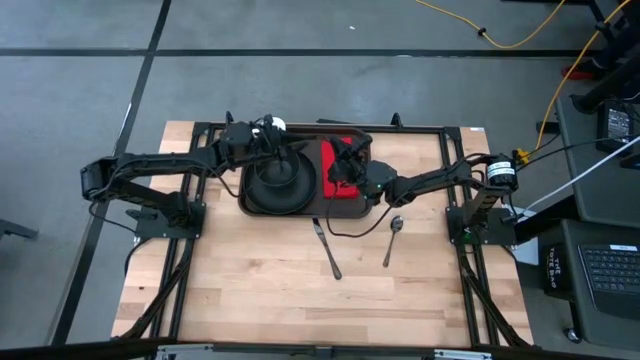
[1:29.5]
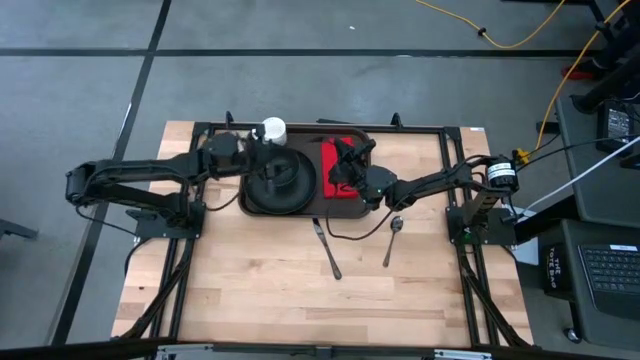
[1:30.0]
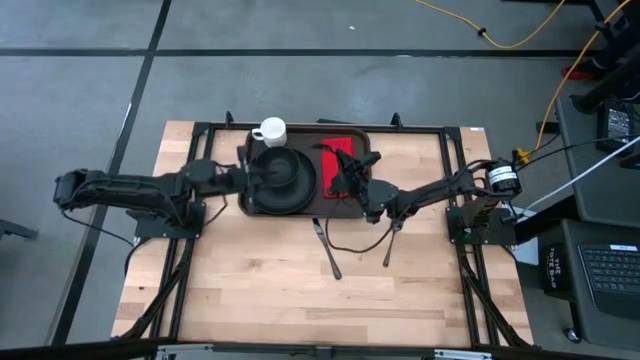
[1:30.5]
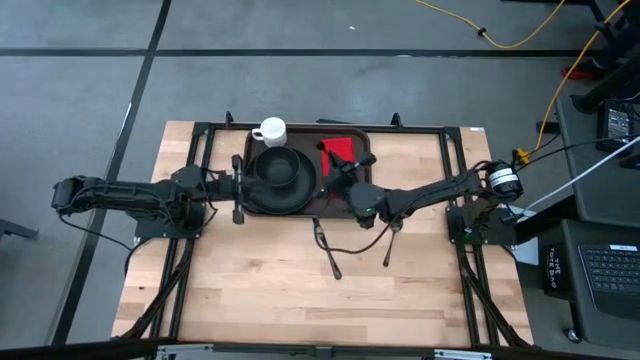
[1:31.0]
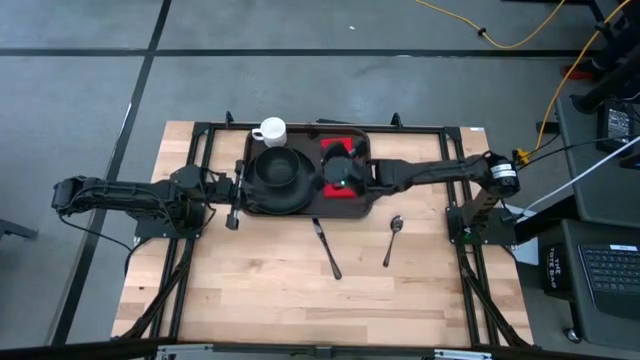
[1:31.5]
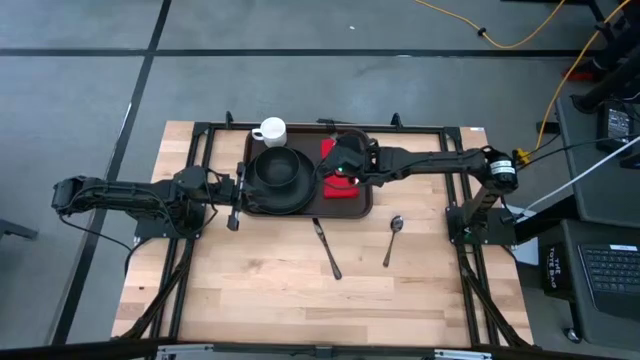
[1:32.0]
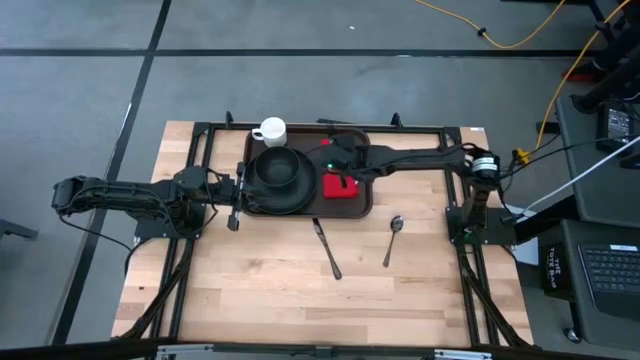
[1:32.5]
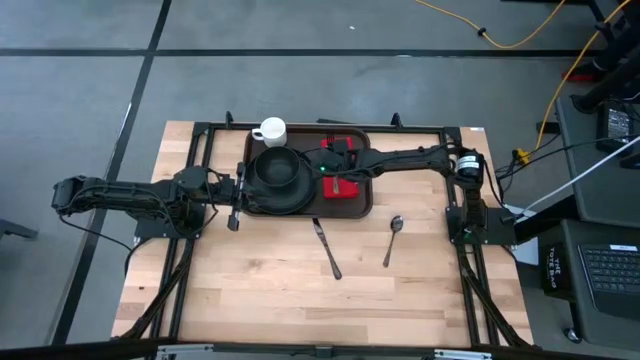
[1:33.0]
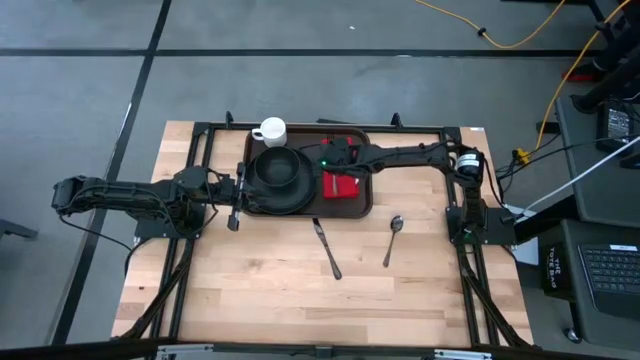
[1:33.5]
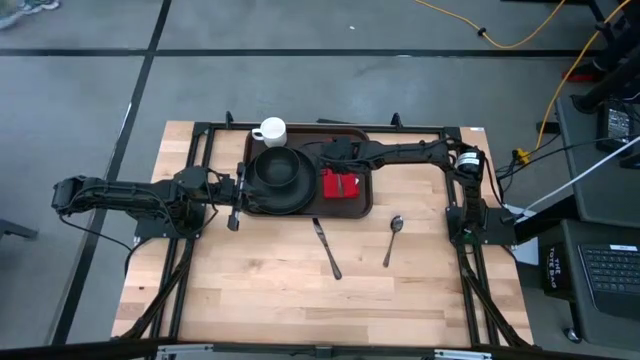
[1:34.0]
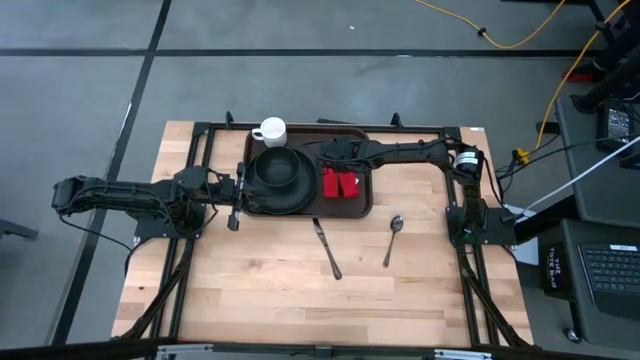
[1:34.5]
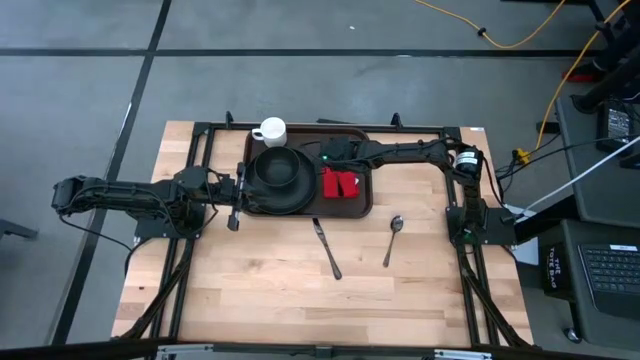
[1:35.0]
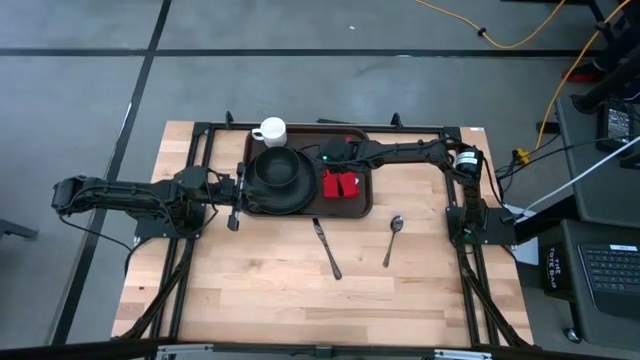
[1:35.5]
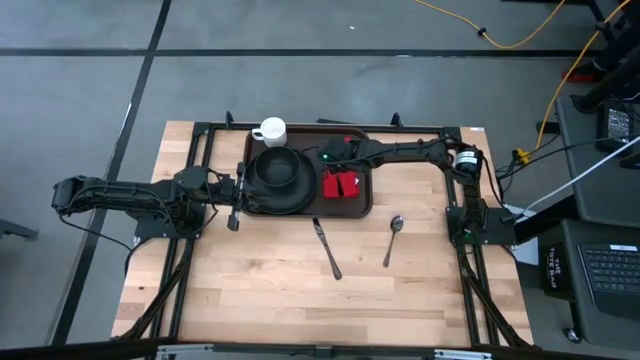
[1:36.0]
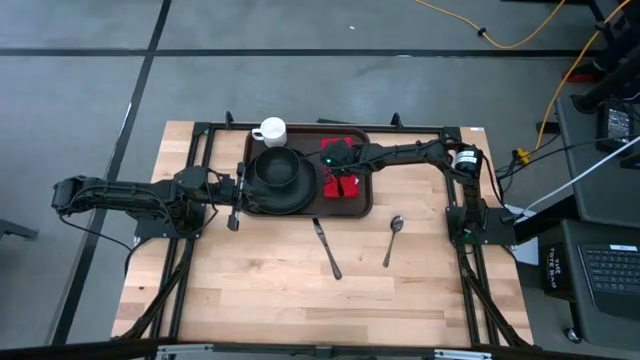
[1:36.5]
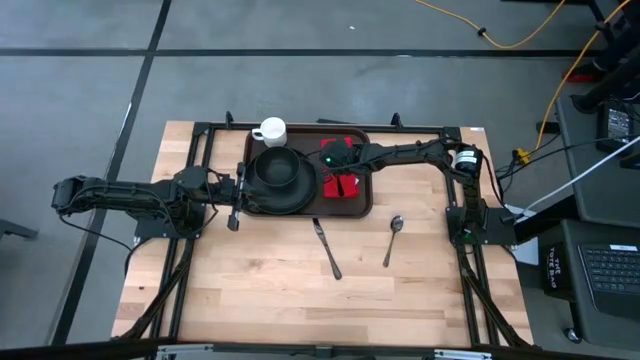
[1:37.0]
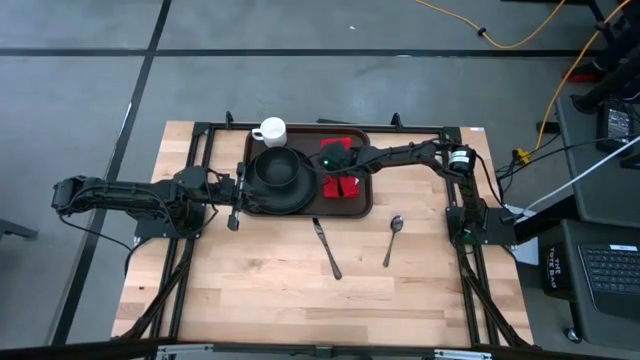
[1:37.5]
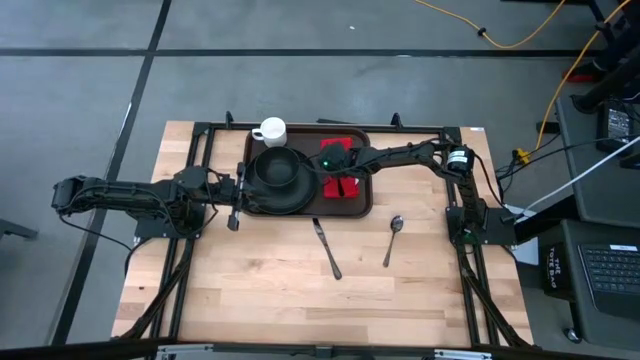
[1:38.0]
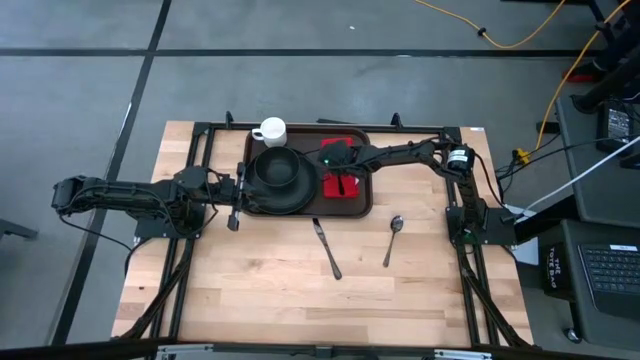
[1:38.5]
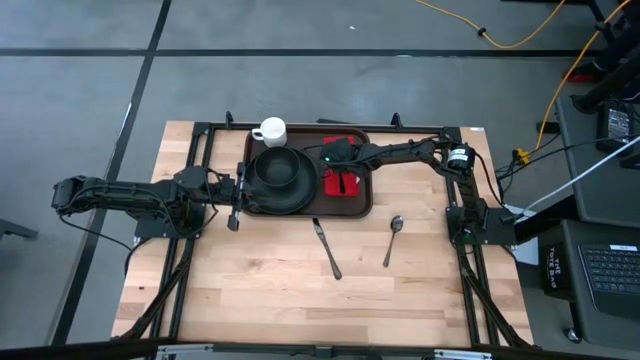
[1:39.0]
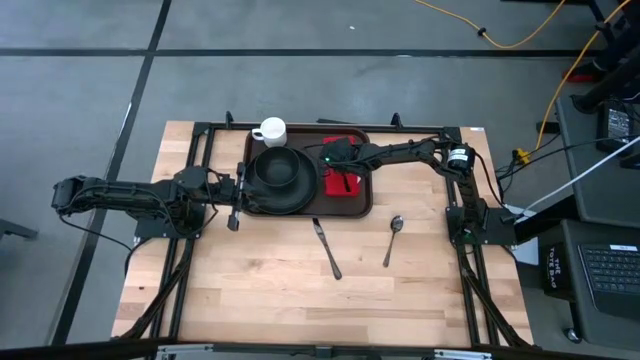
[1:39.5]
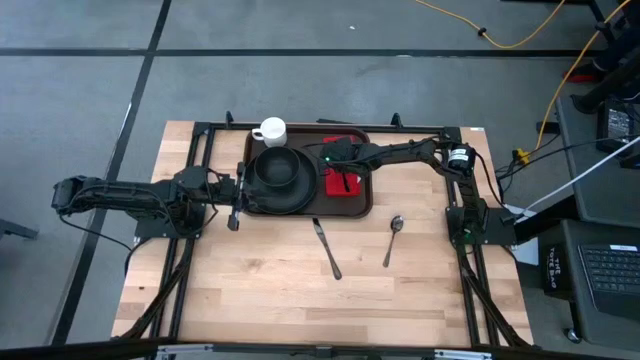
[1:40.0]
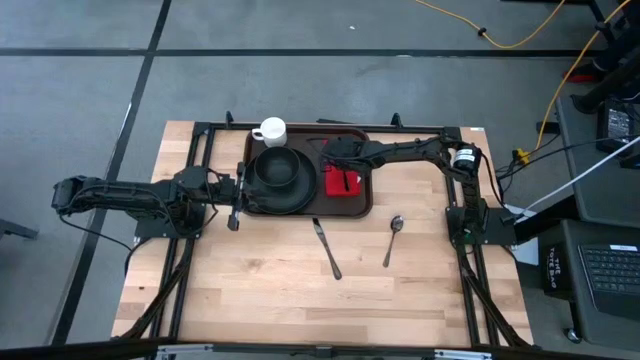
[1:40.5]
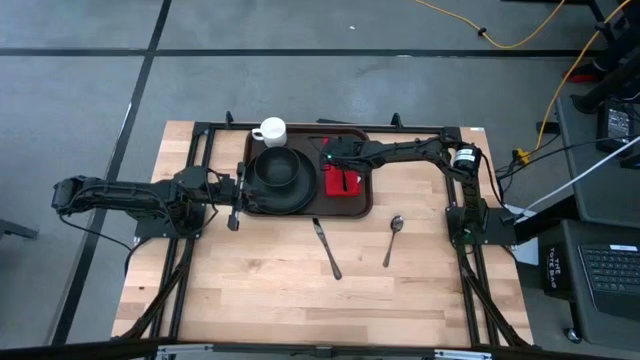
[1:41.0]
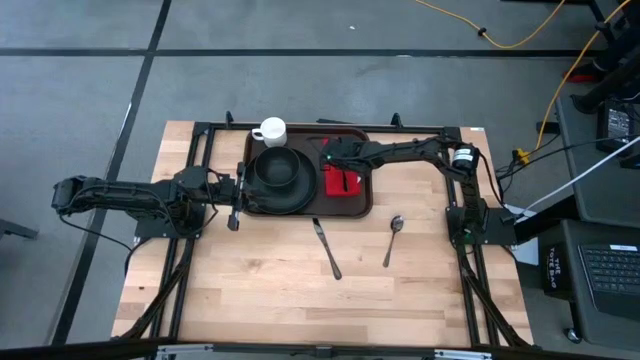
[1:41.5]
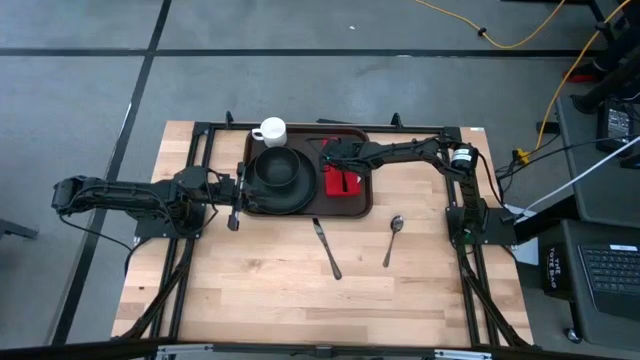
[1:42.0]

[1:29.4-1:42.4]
Task: Set up tray
Put the silver fork on the red napkin

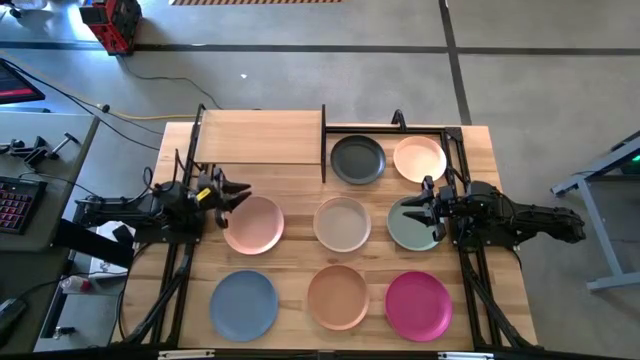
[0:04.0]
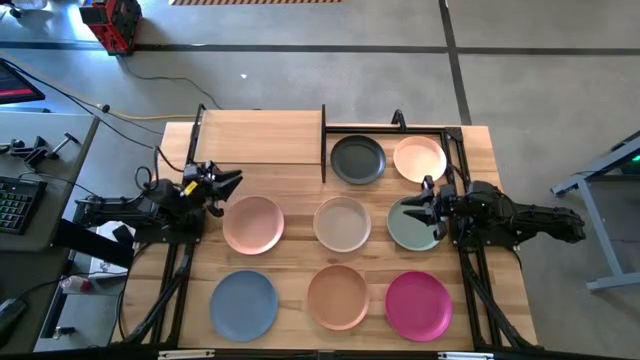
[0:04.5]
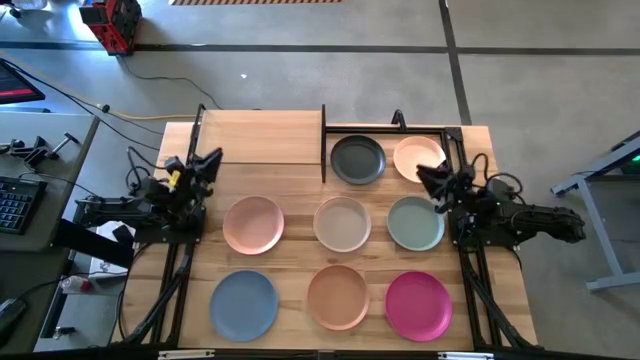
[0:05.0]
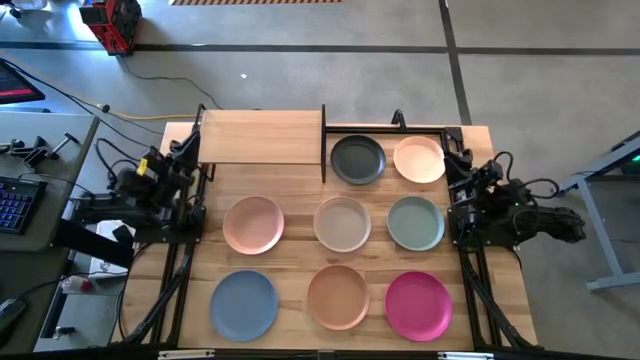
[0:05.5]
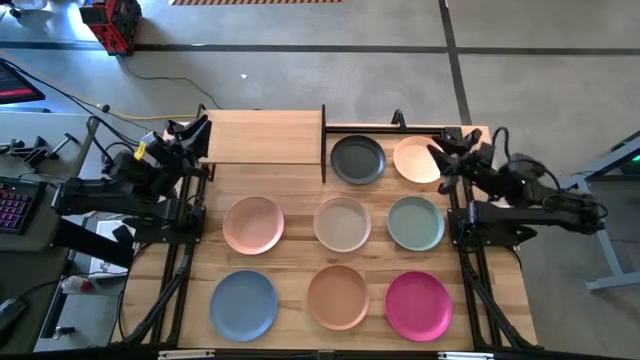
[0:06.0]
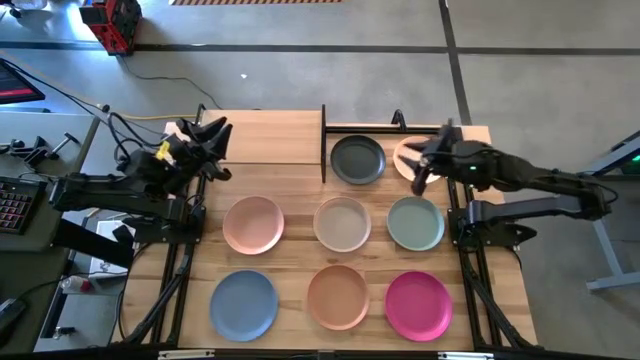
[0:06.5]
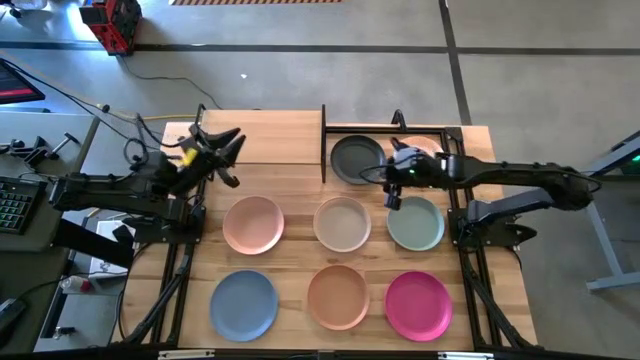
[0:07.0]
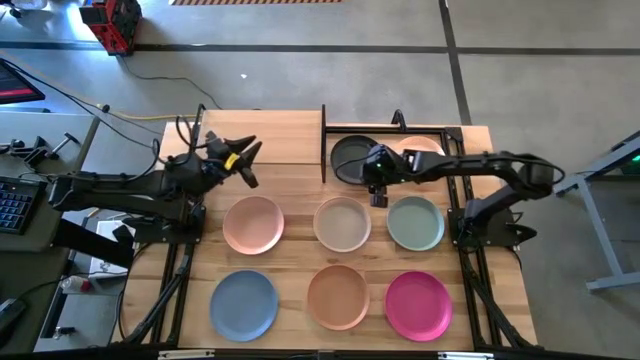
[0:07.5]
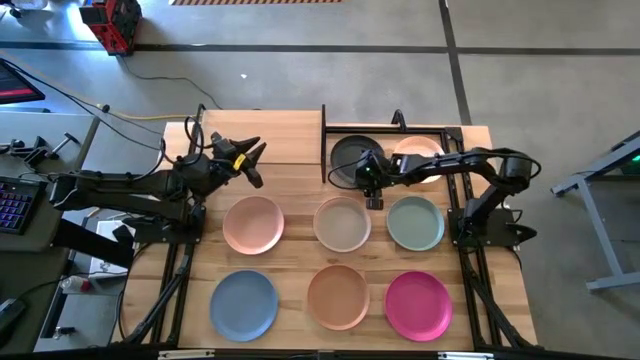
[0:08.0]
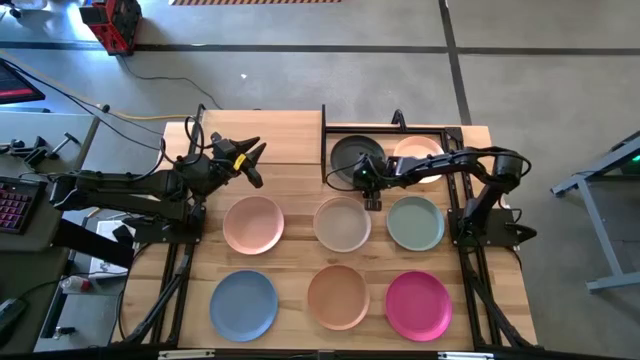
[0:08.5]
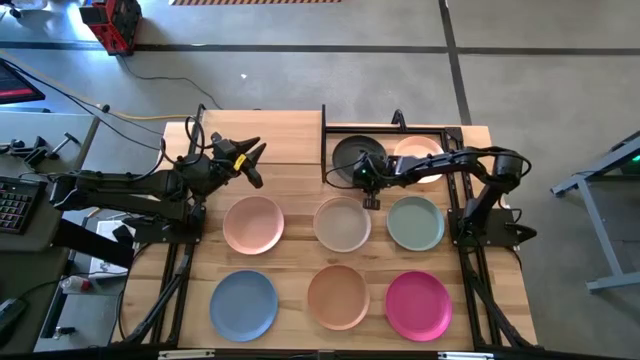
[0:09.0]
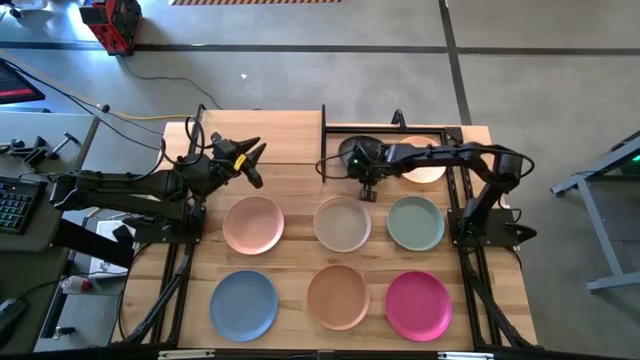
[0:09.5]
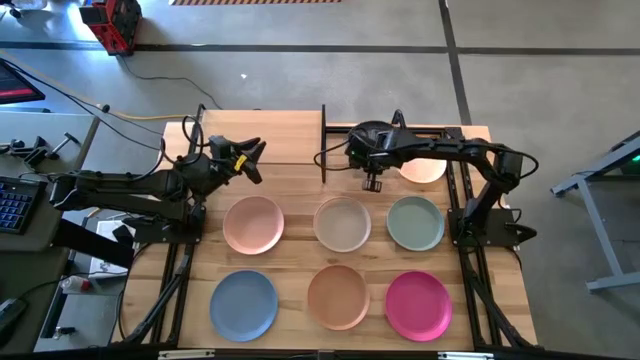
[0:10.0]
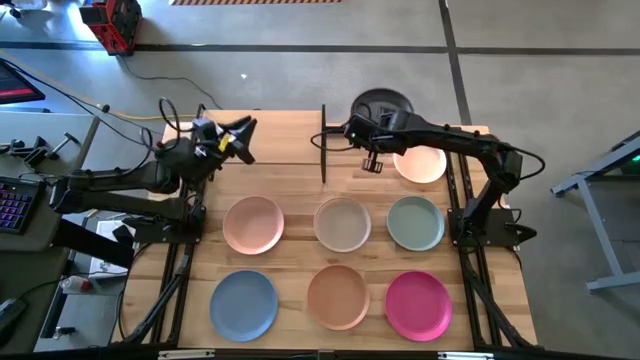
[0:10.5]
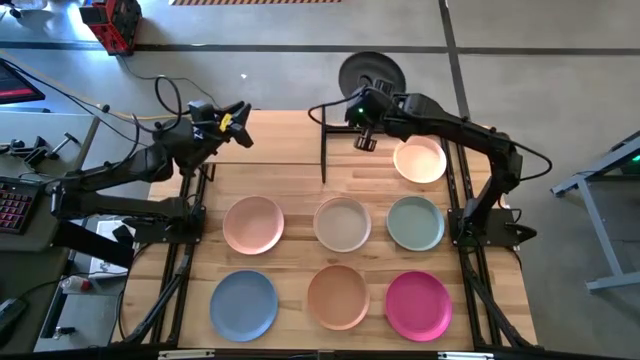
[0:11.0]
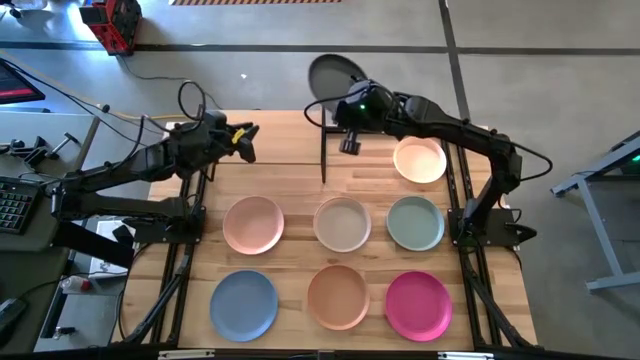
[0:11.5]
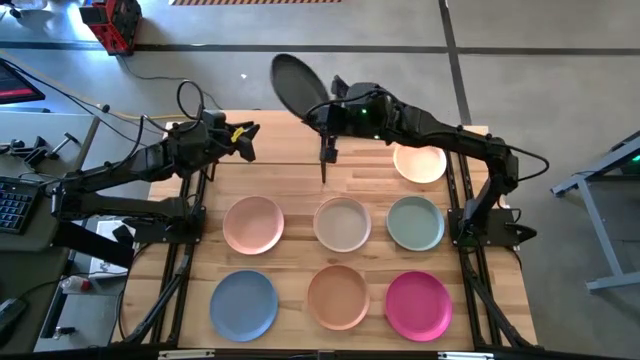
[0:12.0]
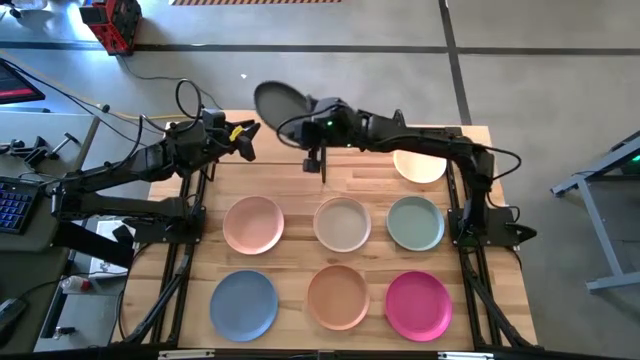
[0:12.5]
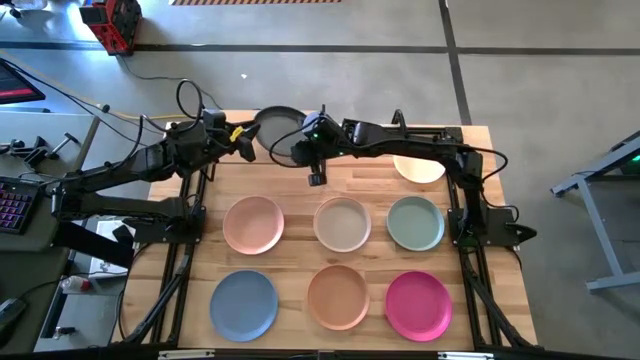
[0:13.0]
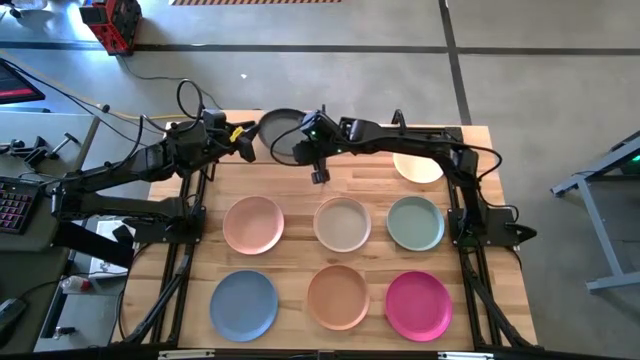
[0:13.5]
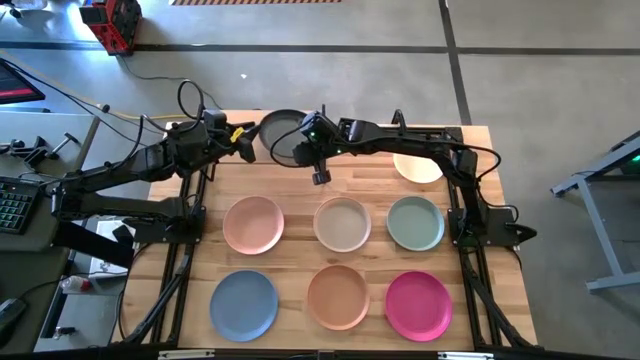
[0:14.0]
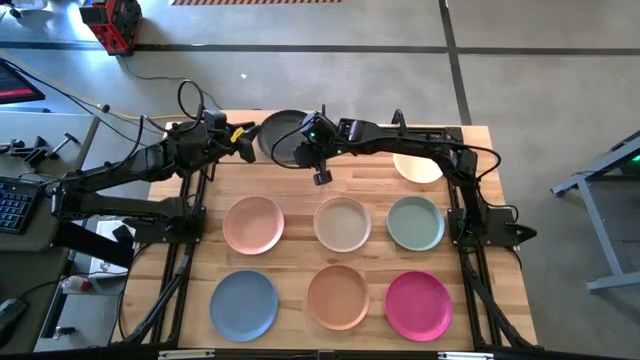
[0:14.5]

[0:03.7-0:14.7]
Task: Place and stack plates onto a shelf
Put the black plate on the shelf
